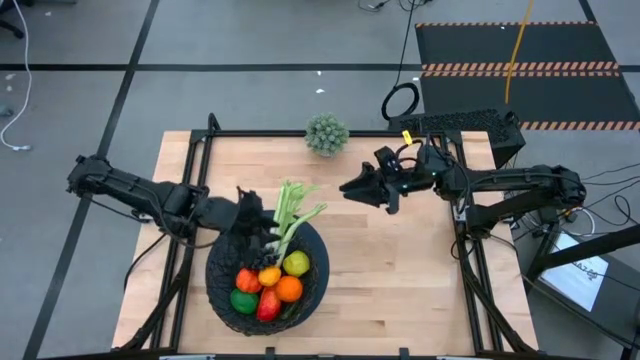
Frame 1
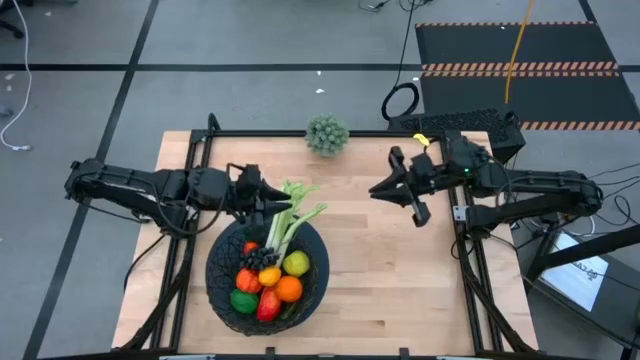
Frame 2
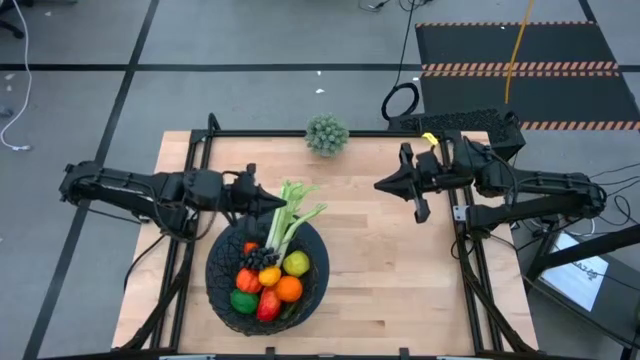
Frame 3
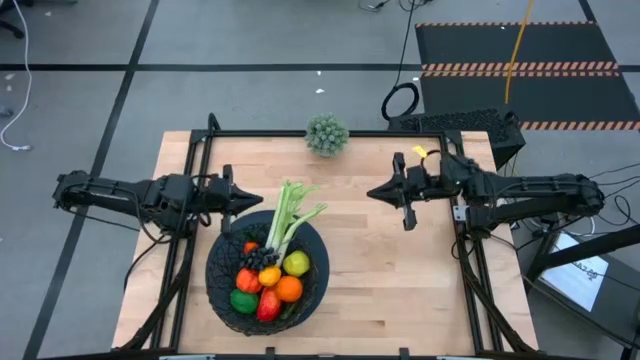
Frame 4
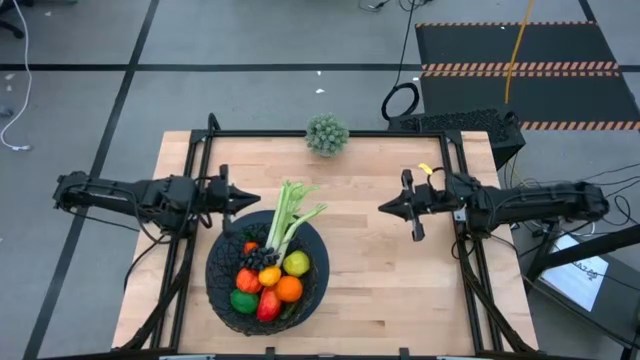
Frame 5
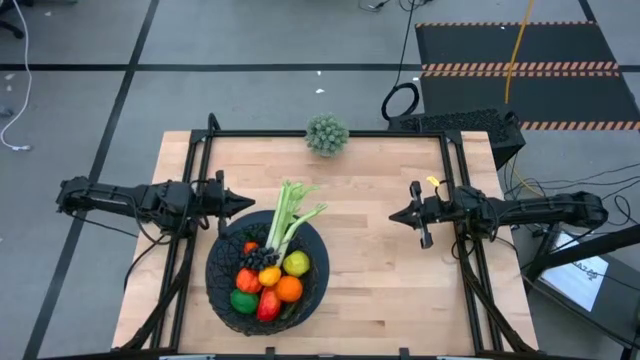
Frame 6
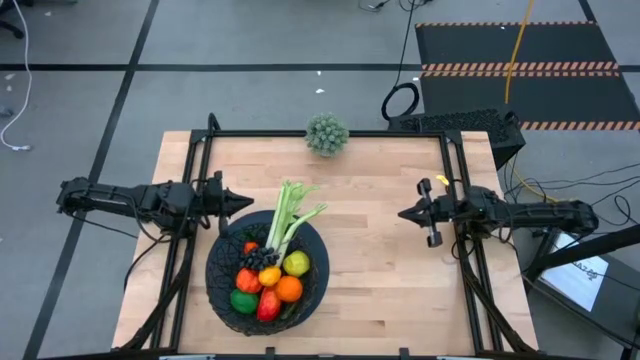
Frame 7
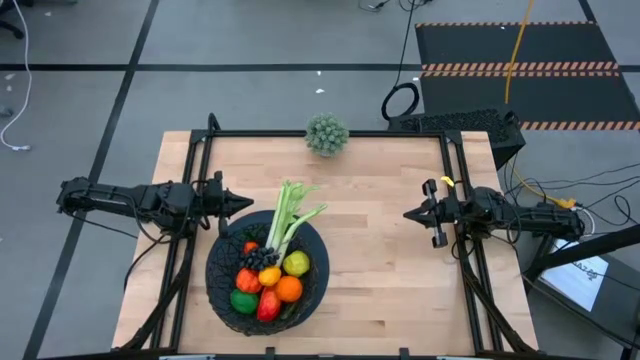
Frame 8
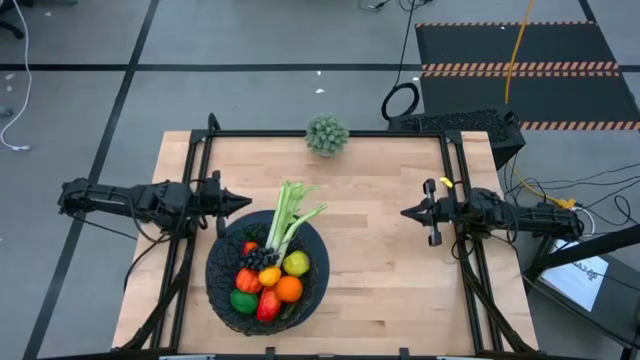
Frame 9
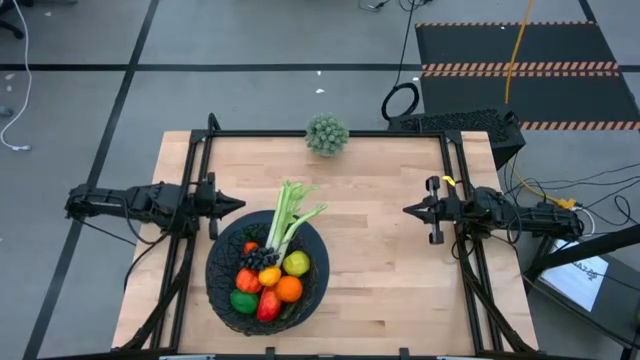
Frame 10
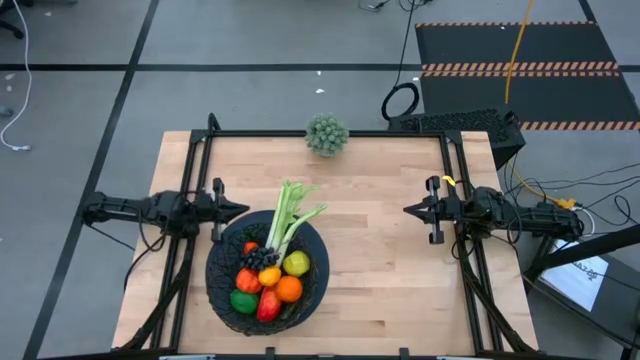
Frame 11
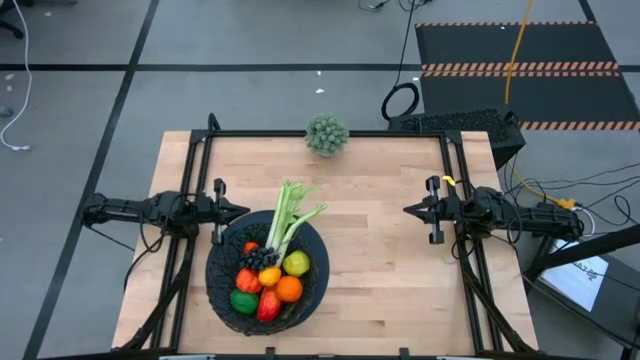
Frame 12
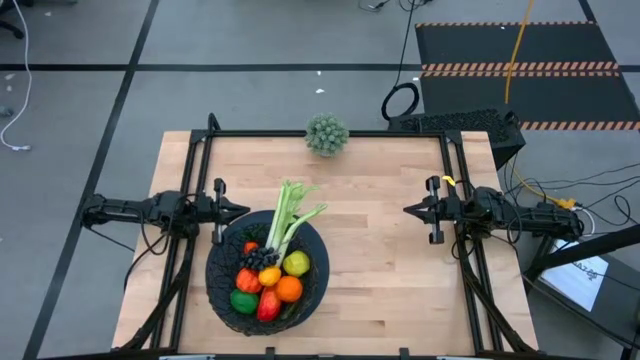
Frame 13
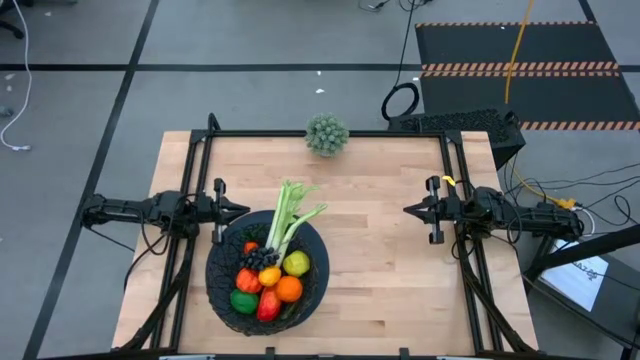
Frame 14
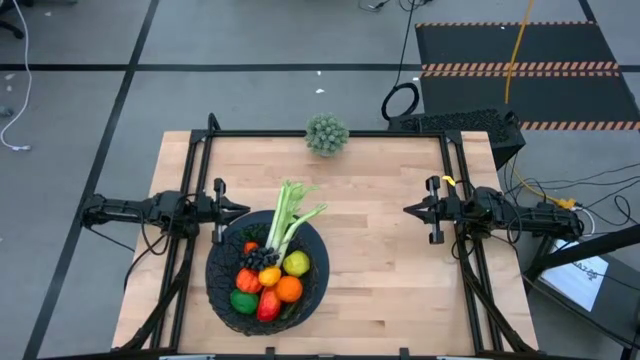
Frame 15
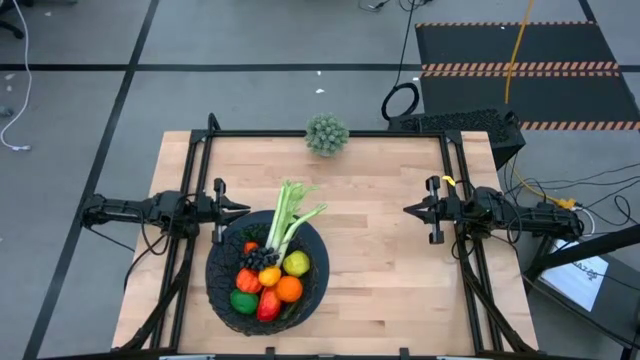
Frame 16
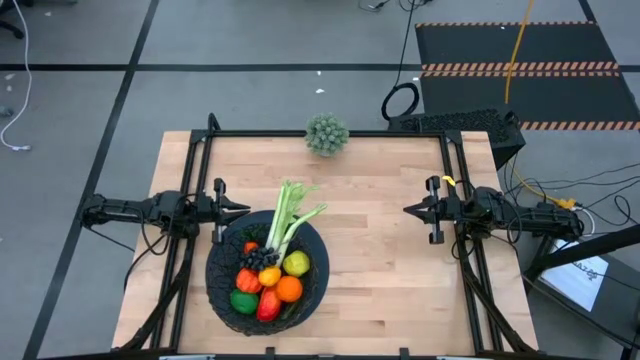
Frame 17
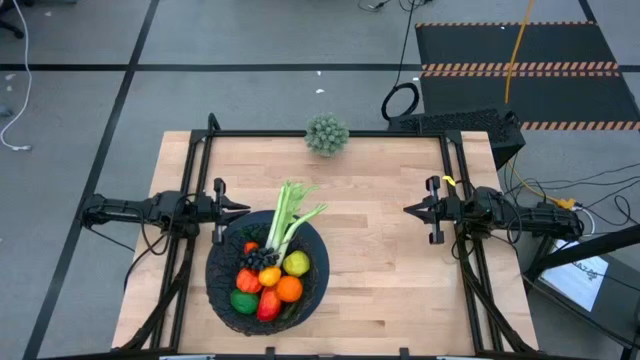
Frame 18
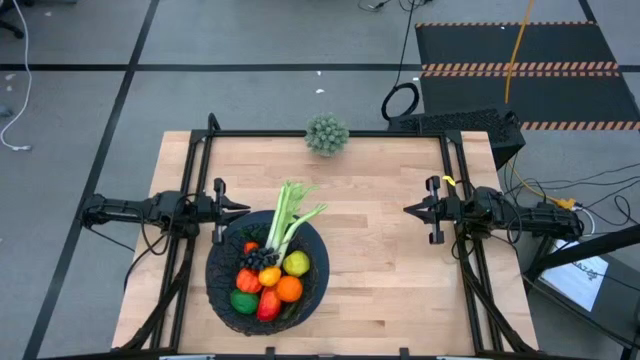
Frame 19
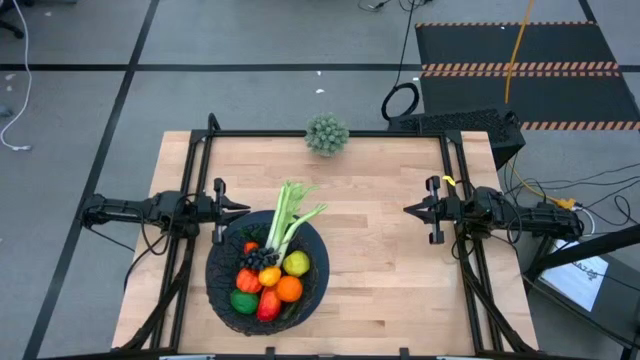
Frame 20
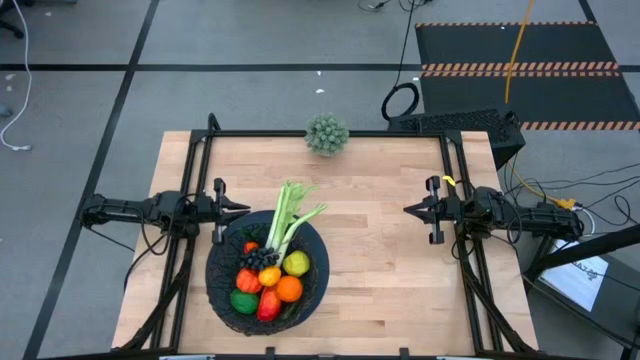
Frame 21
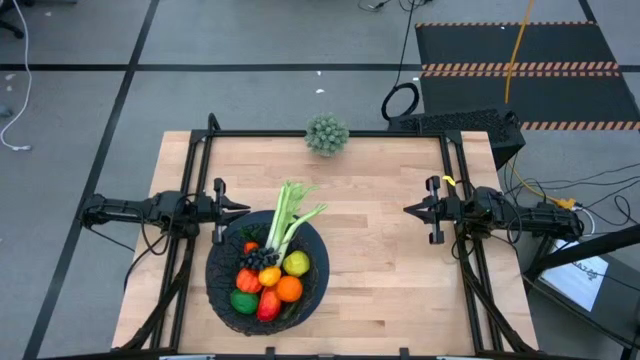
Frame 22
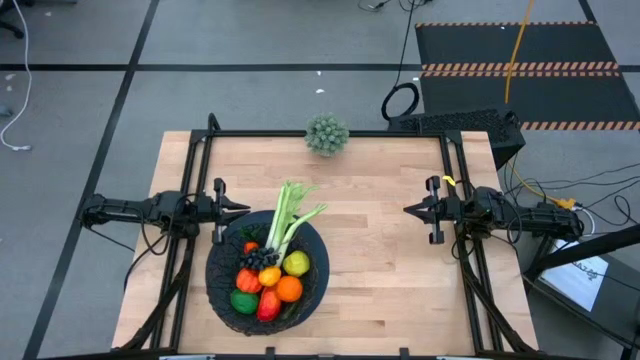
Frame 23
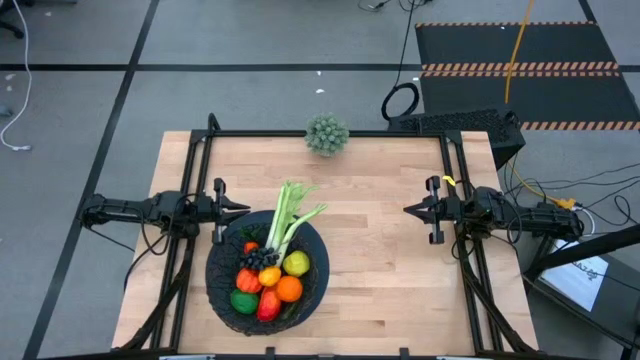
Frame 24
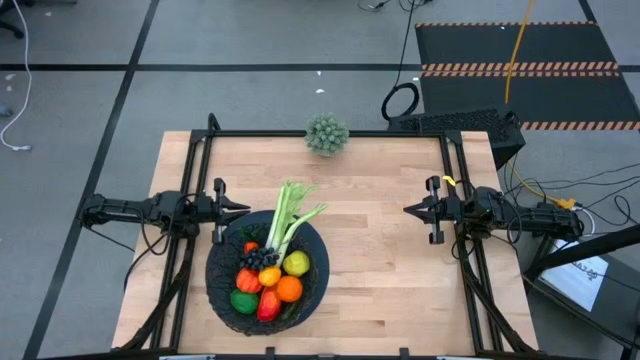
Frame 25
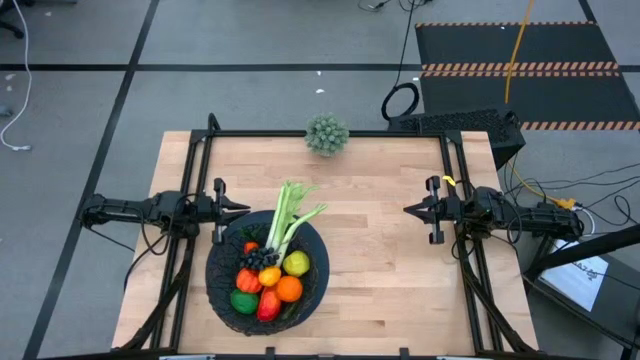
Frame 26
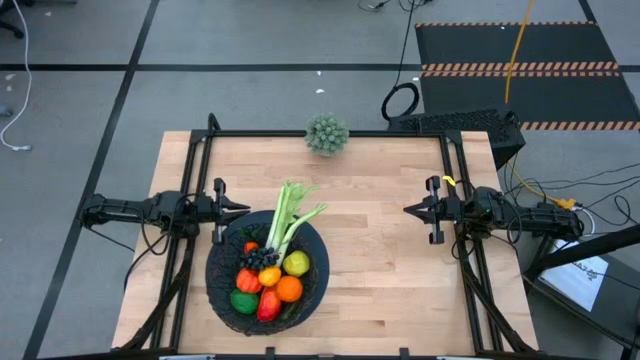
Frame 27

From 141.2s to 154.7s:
Task: Build produce basket
Return to Home Position

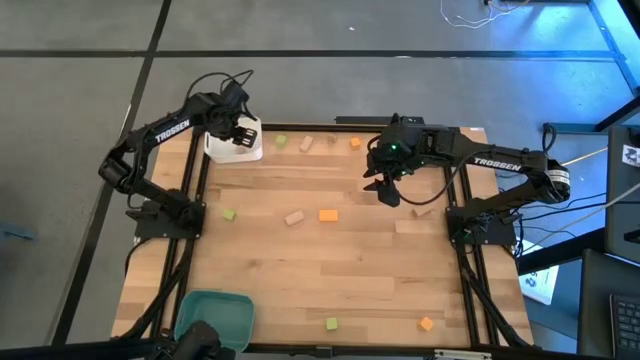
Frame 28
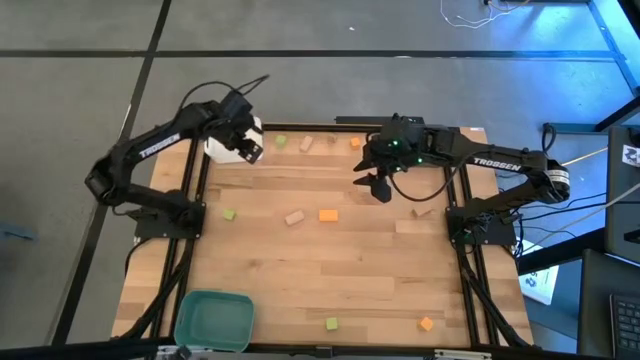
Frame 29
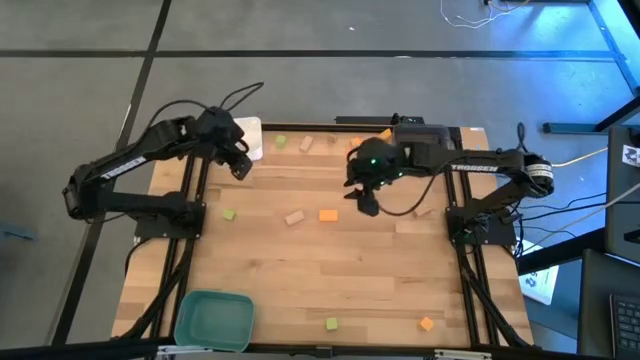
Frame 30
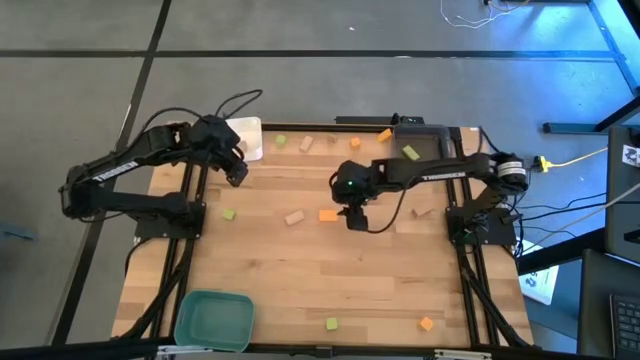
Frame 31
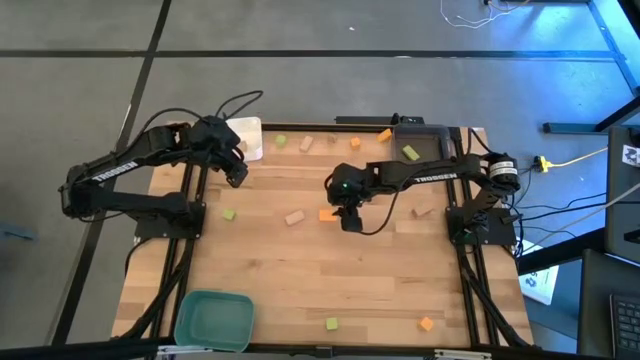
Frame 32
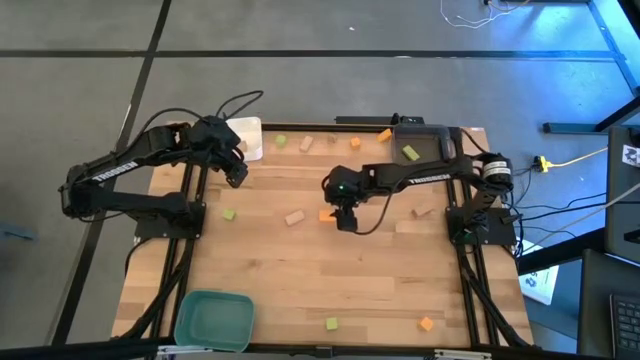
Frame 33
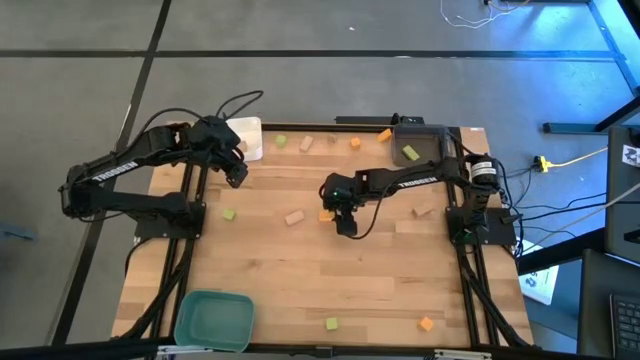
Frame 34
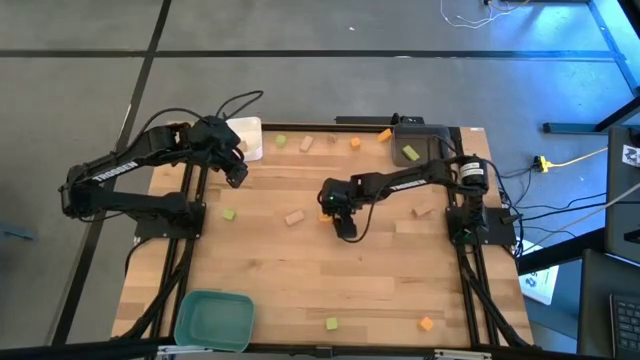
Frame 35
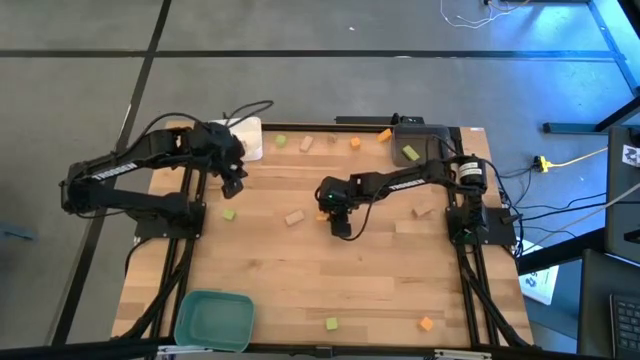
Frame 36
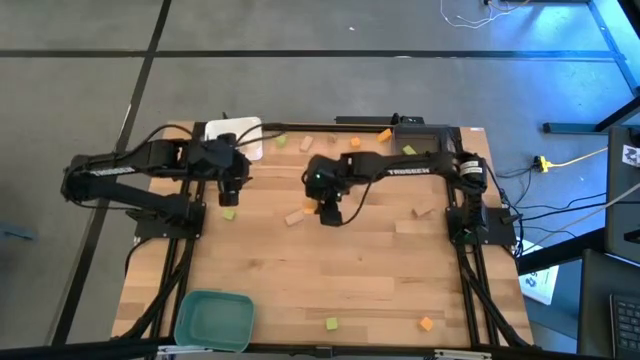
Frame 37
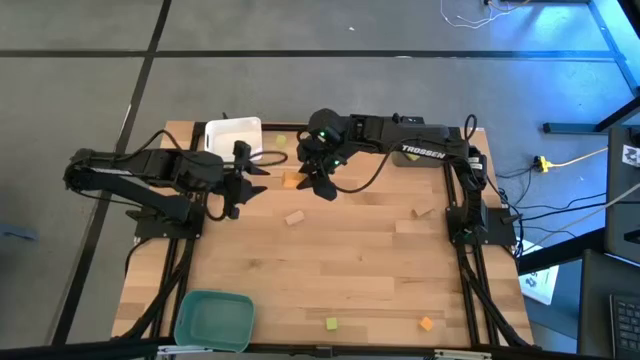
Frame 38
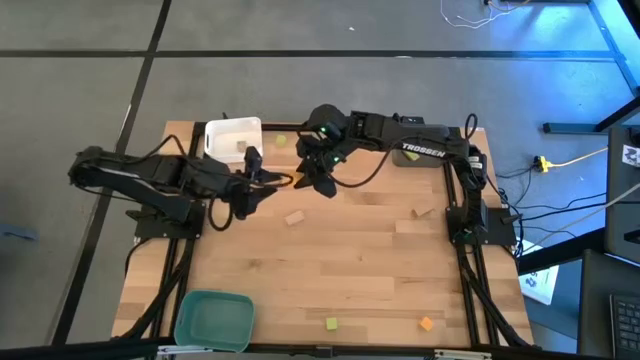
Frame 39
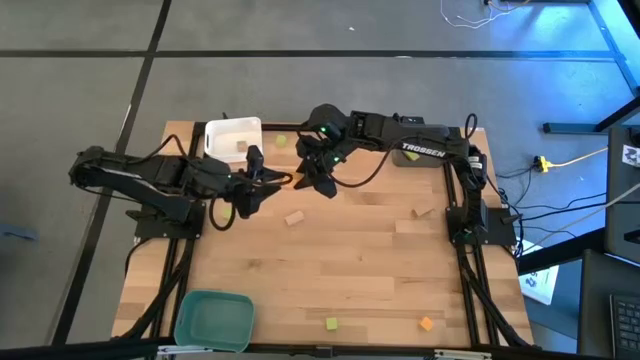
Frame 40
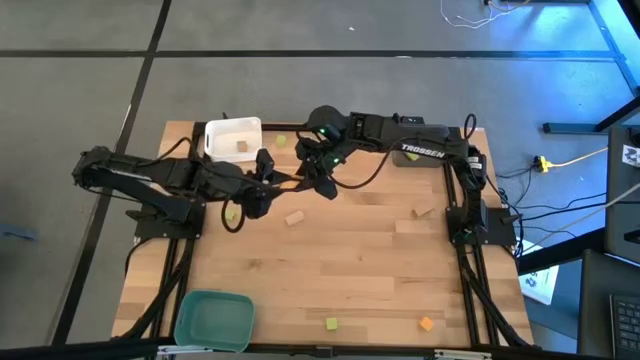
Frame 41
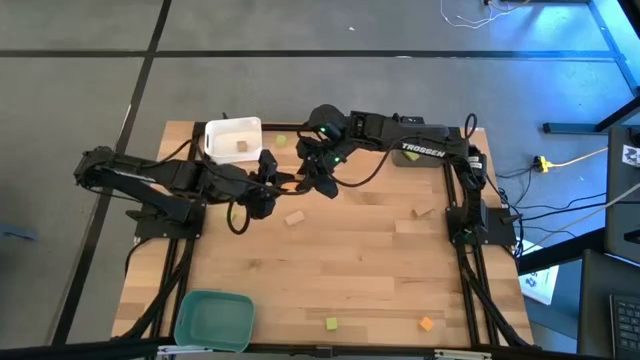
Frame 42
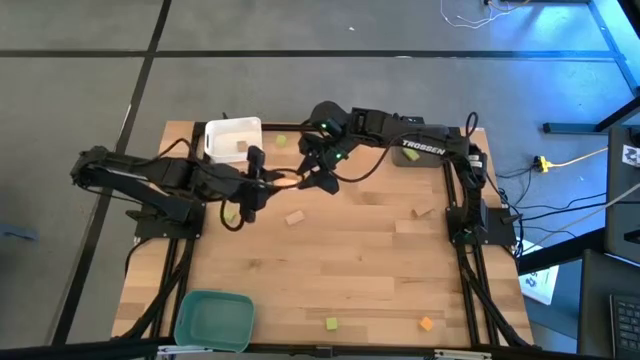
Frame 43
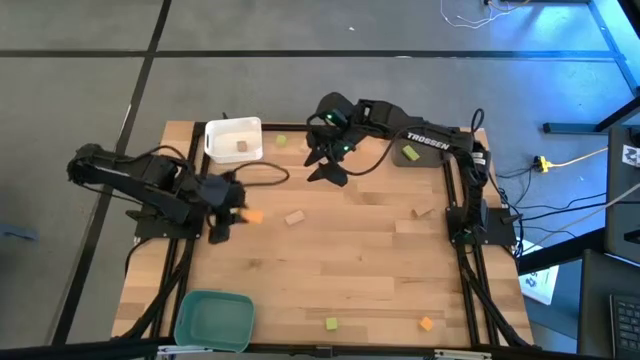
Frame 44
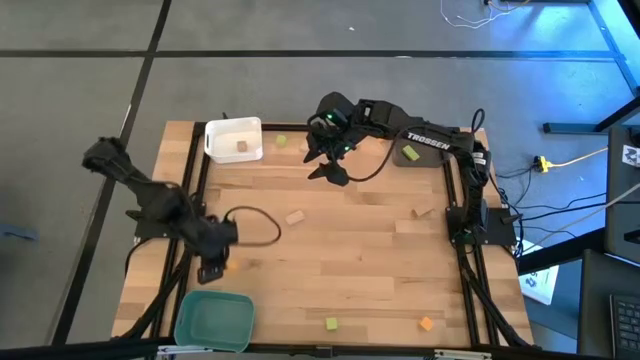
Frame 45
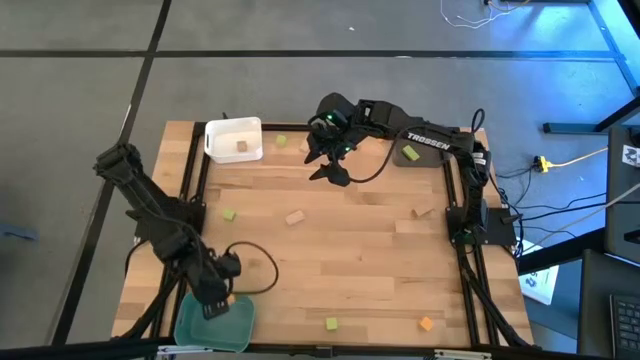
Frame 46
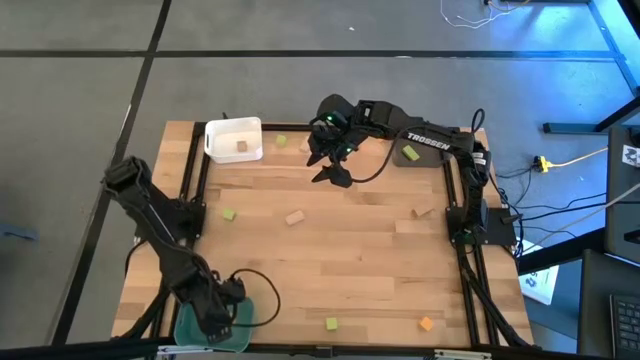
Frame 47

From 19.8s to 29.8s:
Task: Sort & place blocks by color
Put the orange block into the green bin
